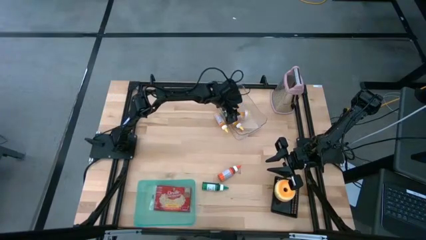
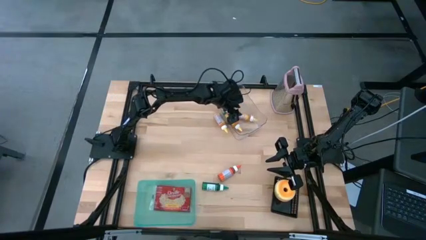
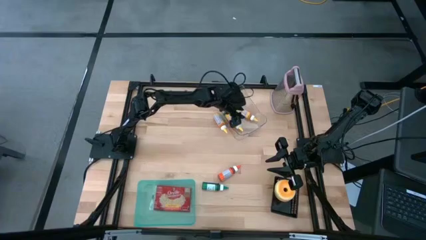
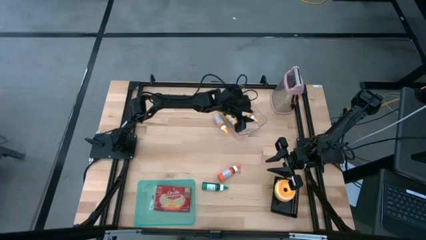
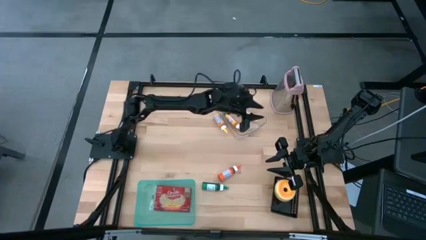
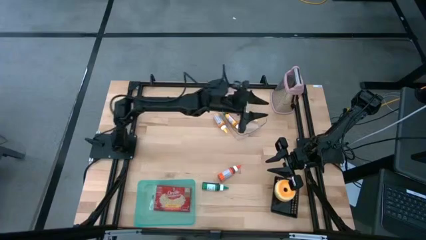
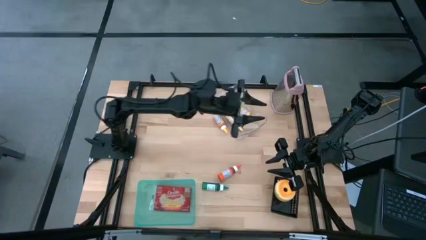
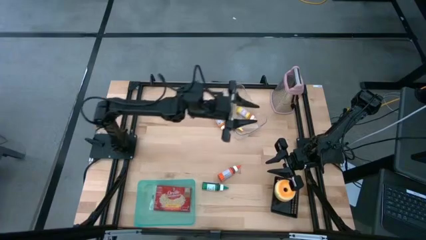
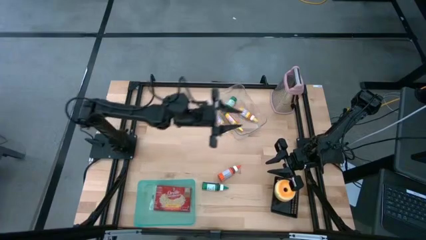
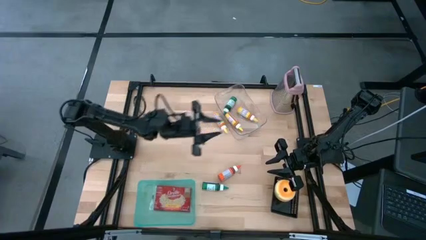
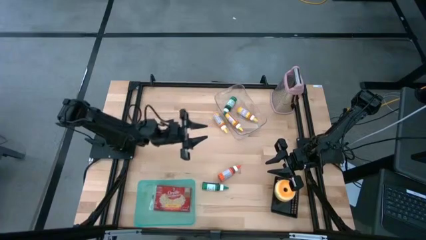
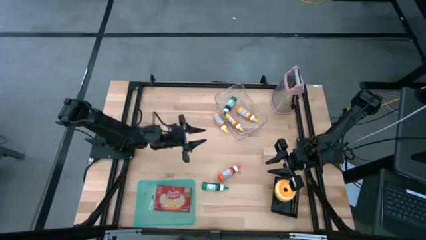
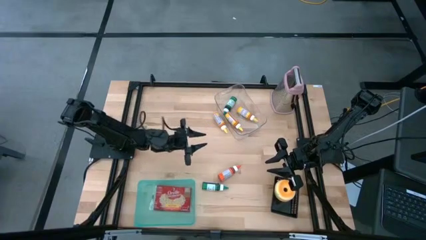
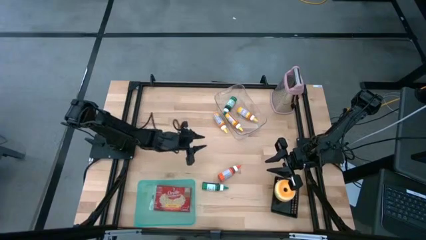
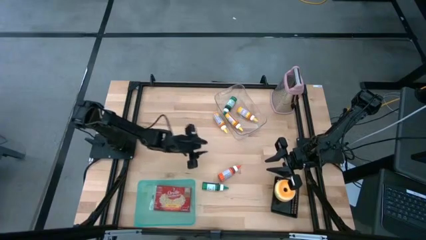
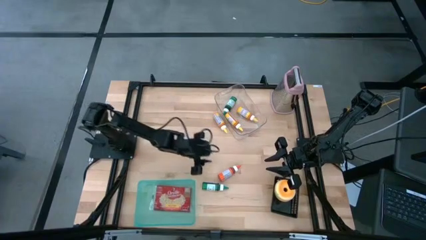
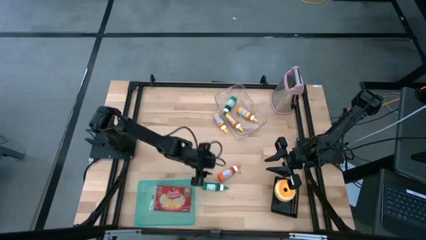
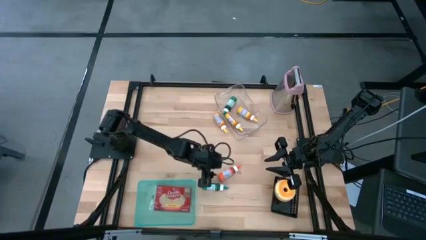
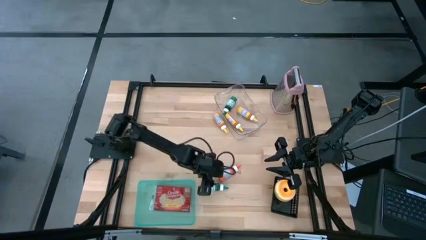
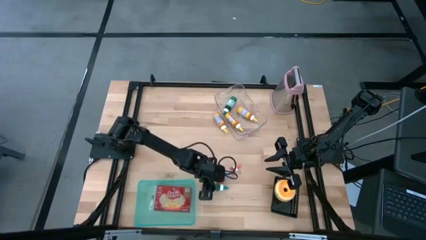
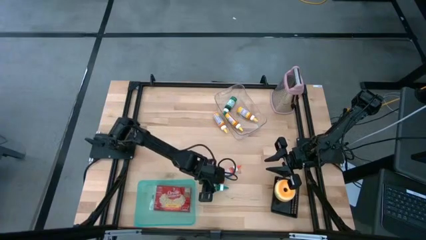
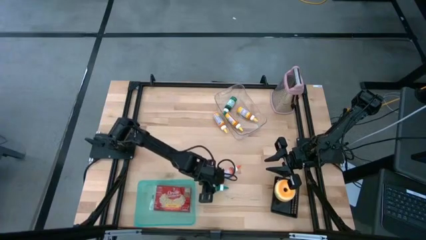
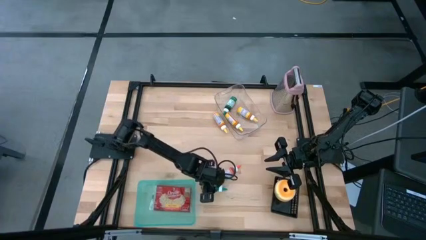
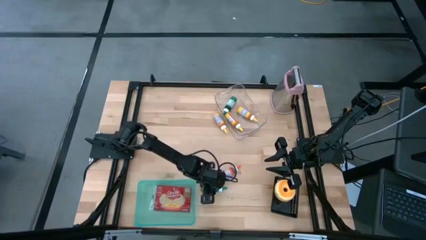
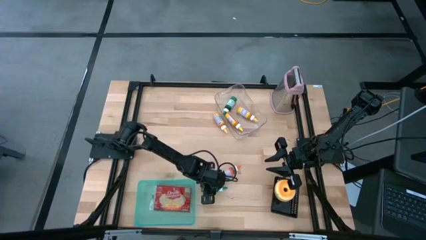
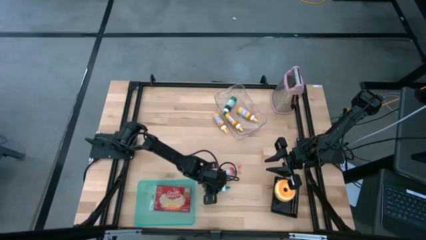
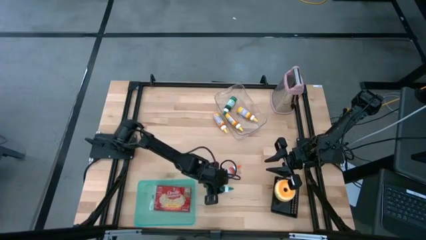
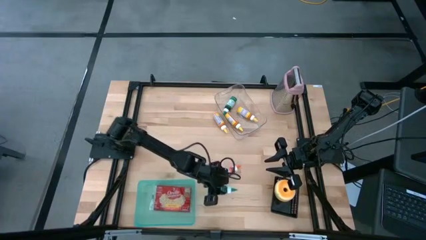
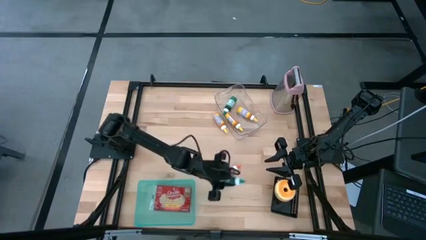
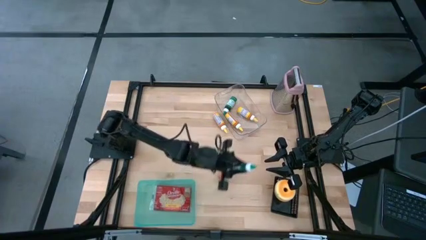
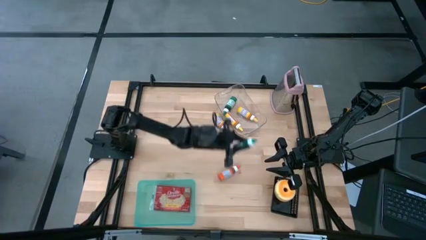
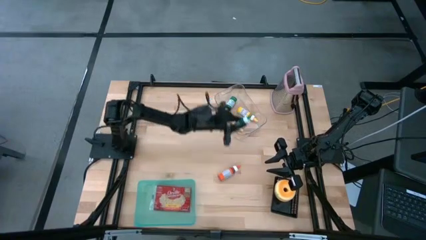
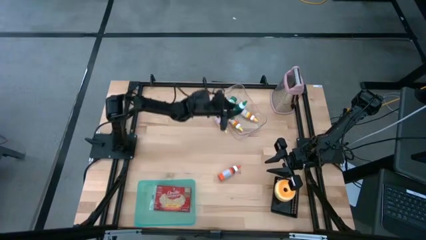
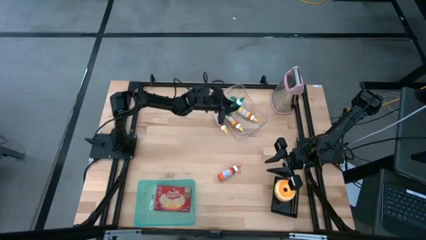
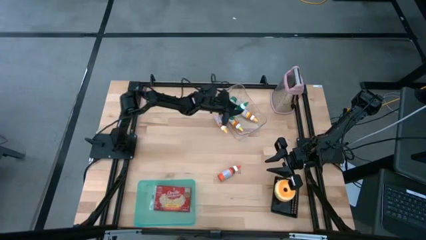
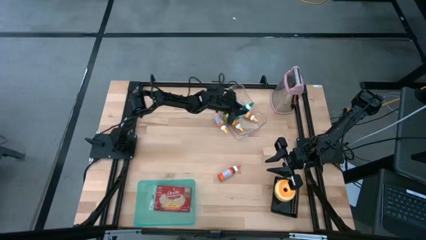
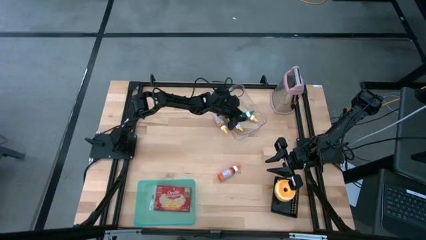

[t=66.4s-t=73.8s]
Task: Pick & Place Food Item
Put the green food coloring into the transparent bin

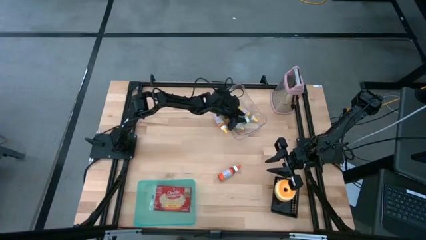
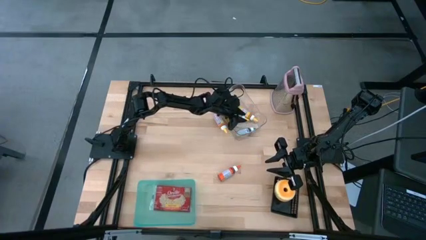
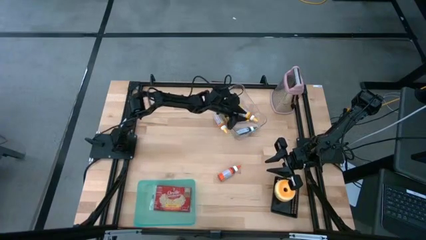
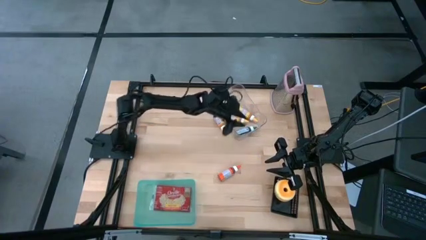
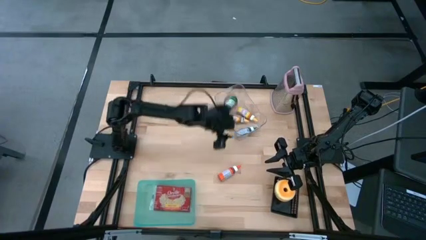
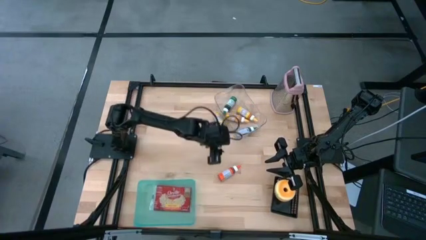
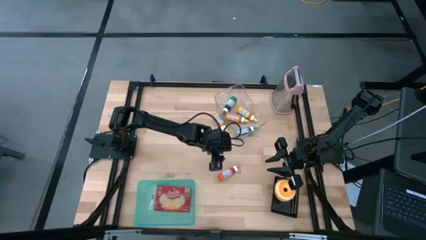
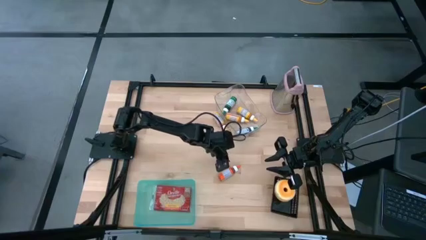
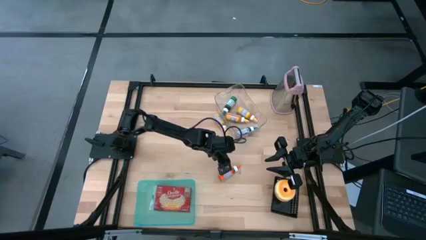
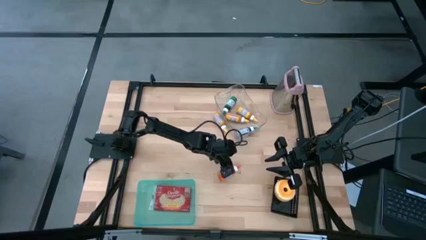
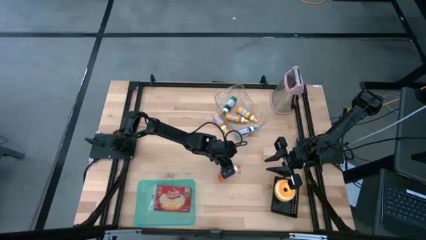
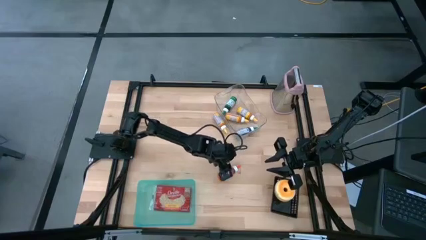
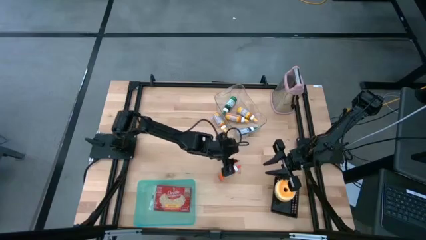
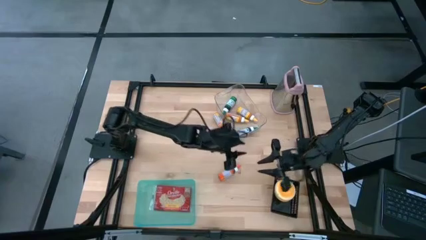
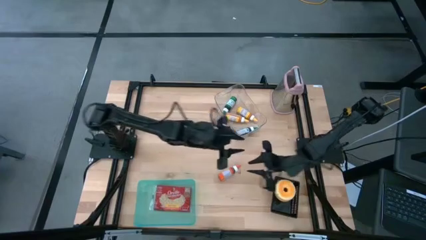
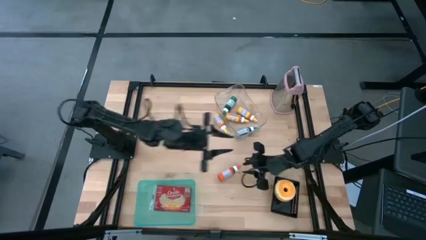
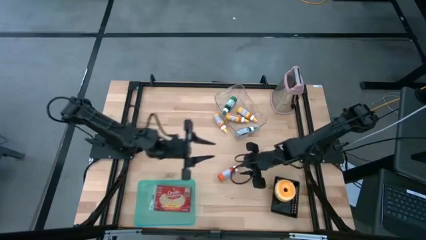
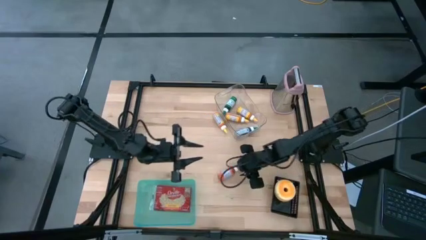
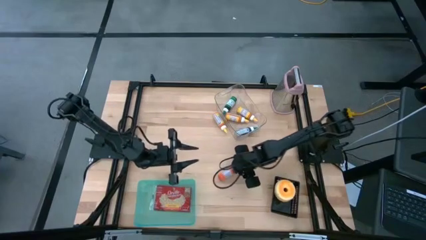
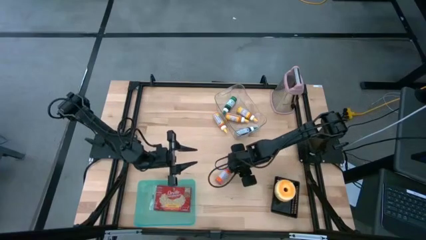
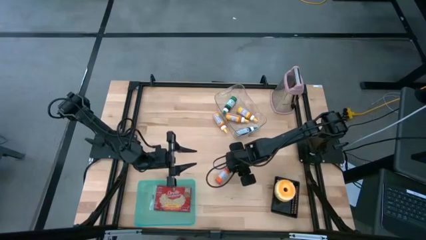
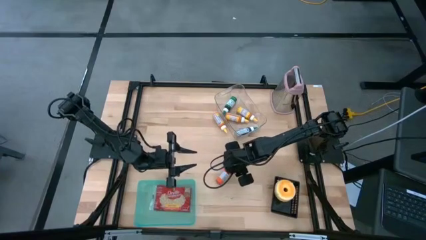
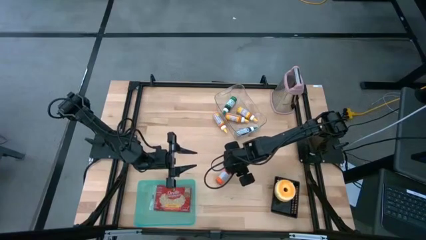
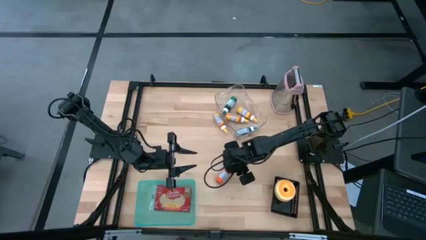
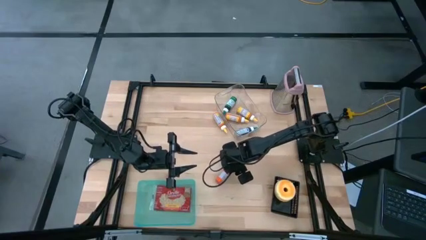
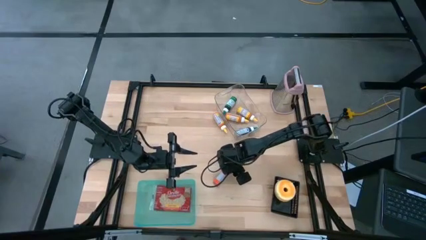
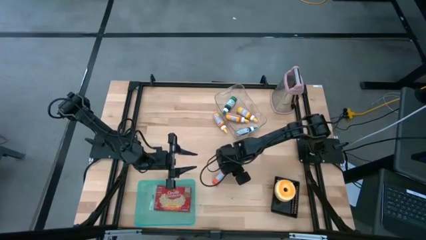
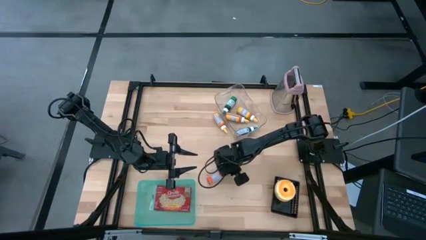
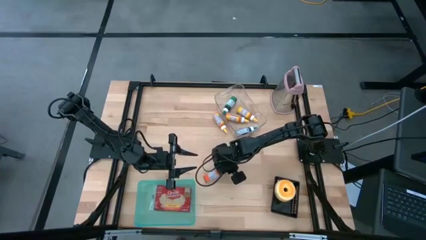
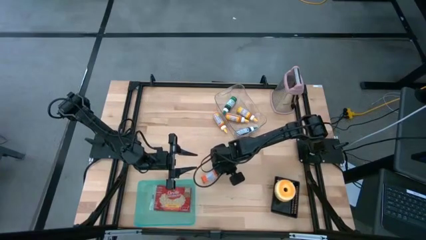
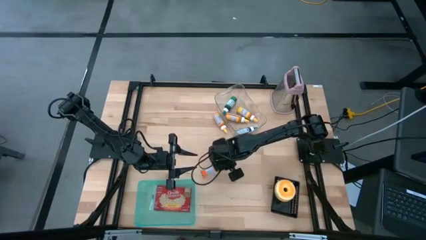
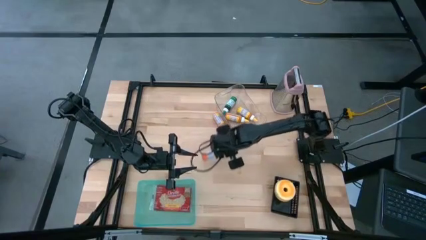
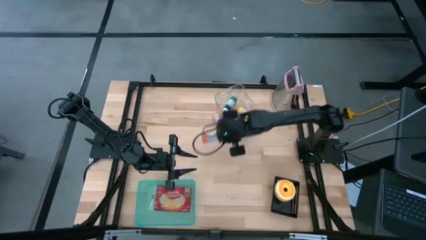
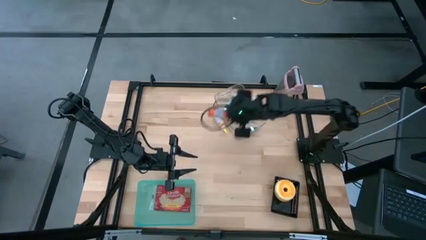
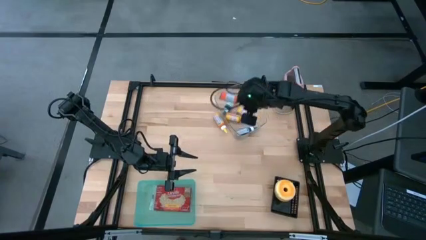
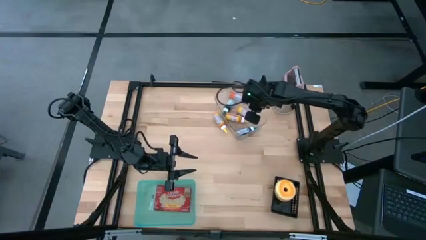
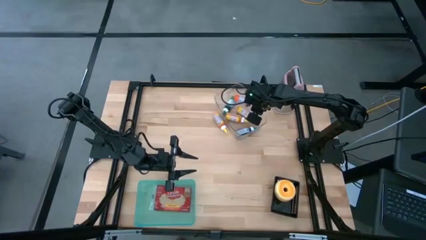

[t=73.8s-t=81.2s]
Put the red food coloring into the transparent bin

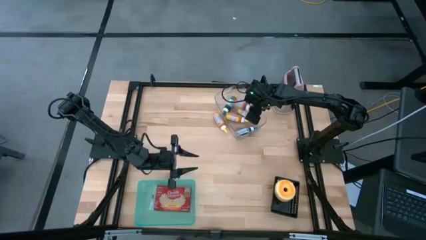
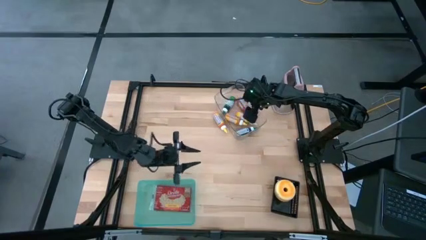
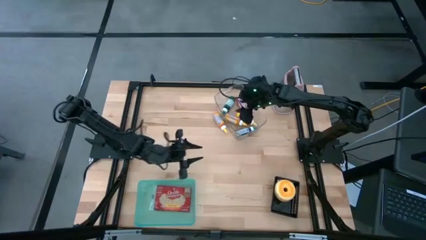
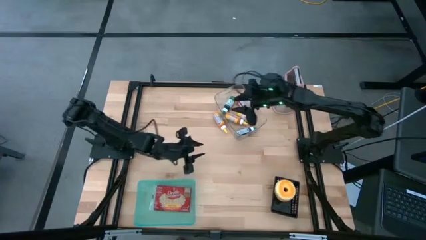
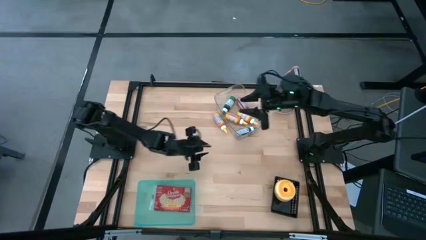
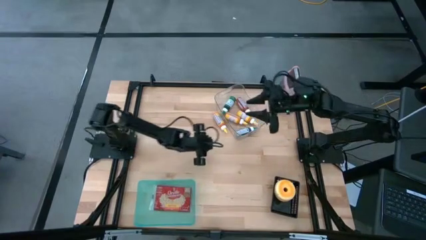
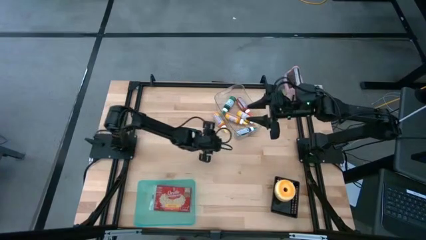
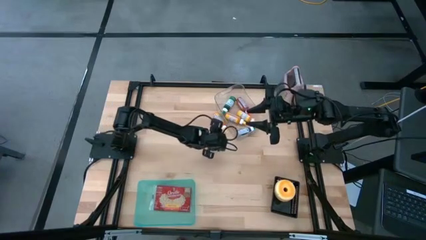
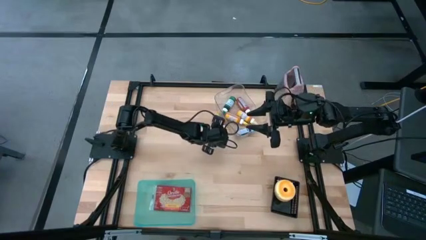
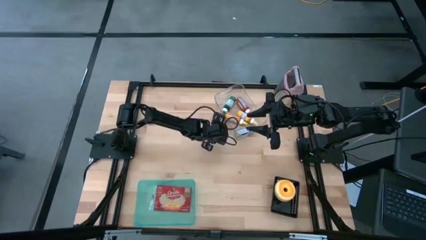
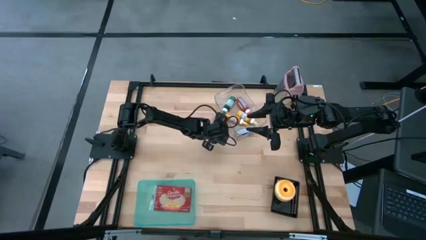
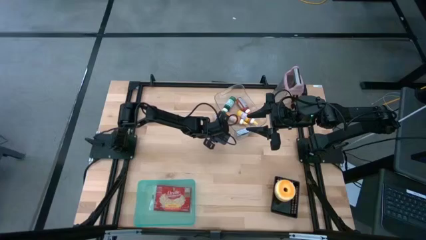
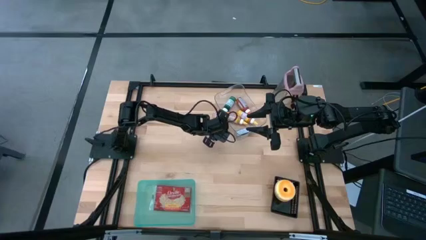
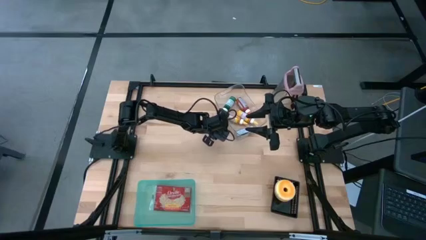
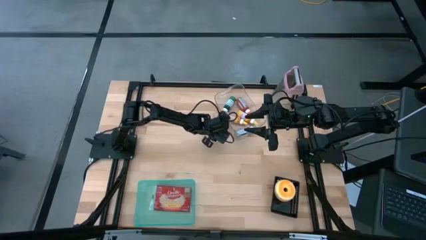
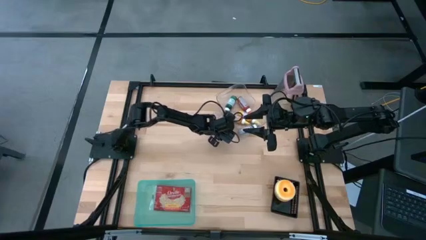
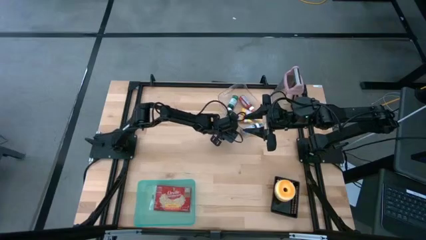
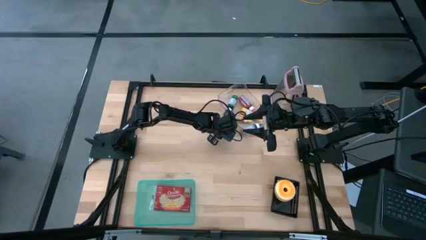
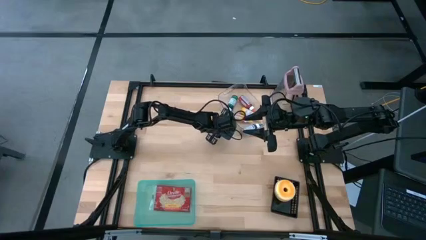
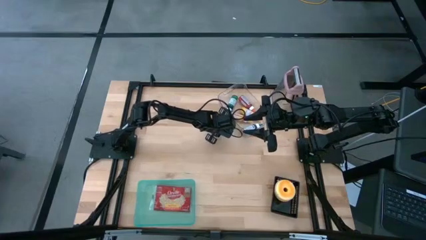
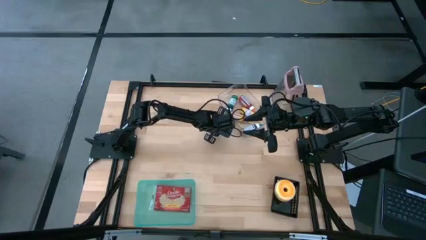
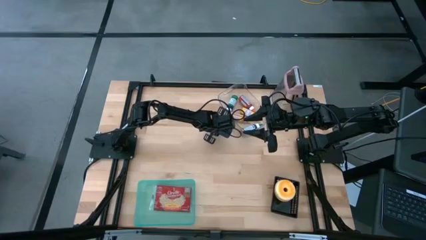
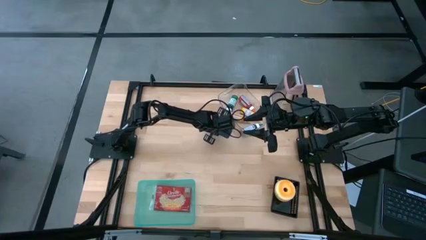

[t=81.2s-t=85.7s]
Put the orange food coloring into the transparent bin
